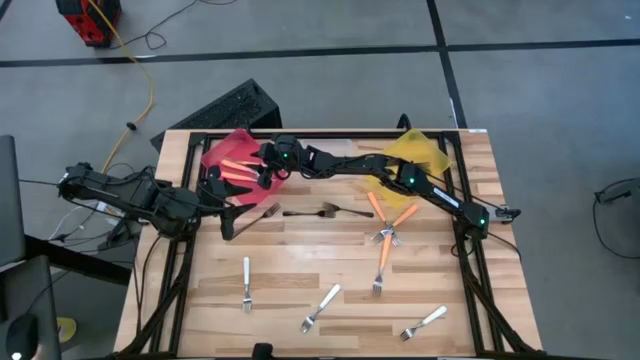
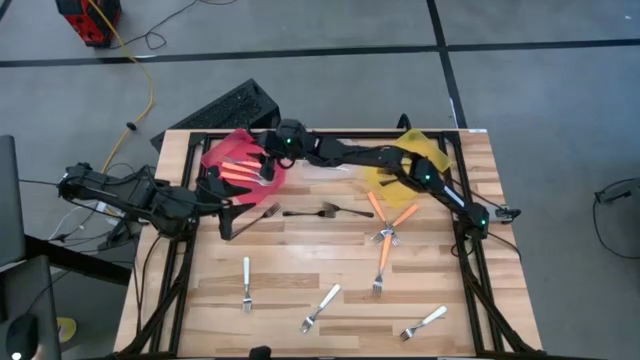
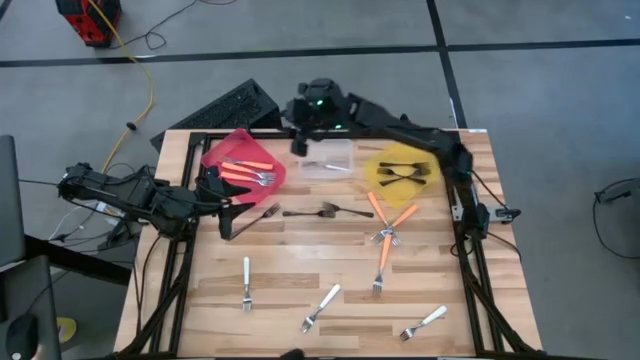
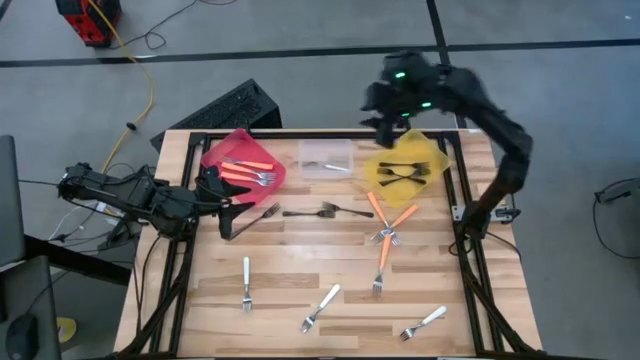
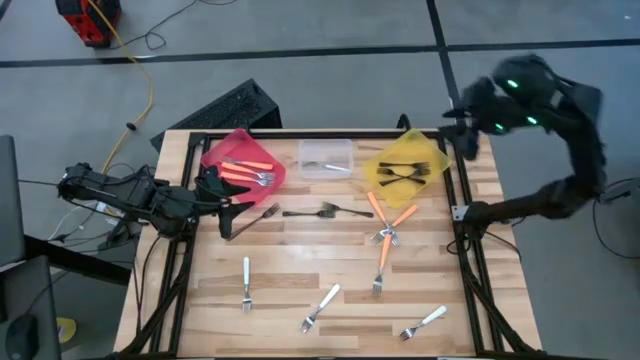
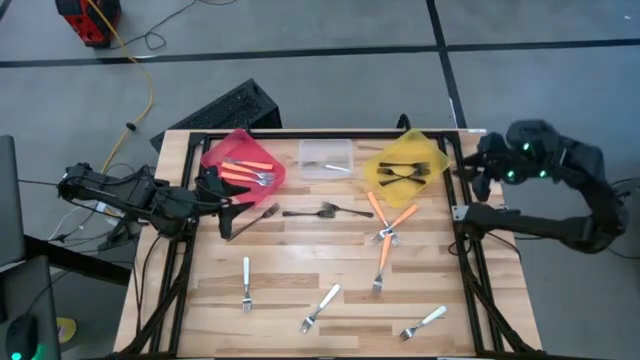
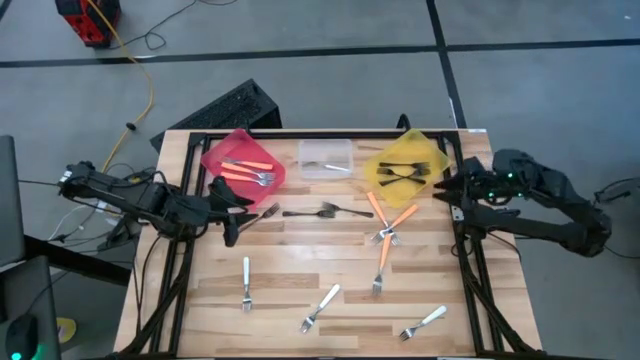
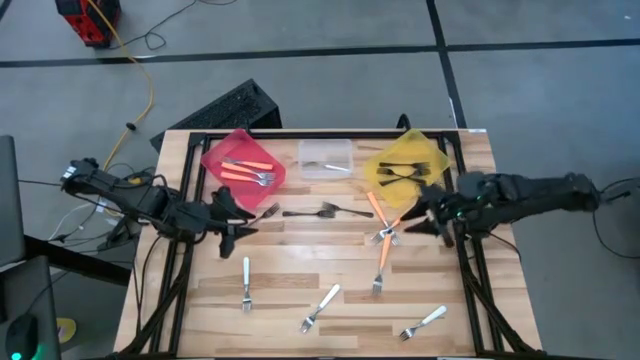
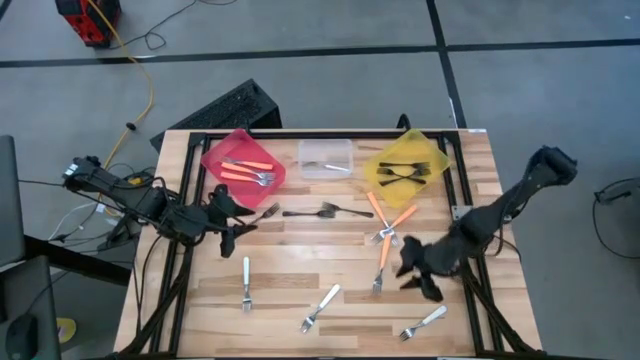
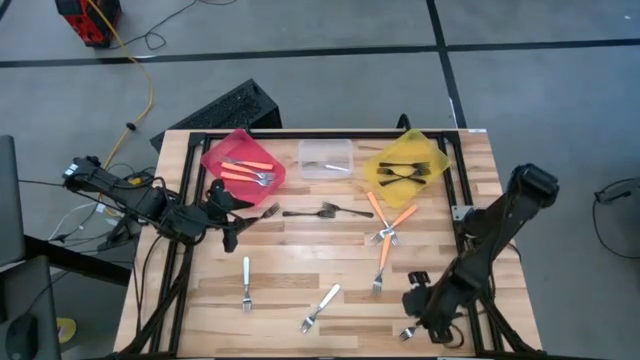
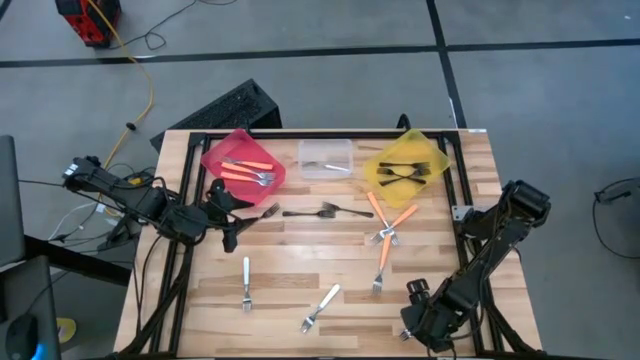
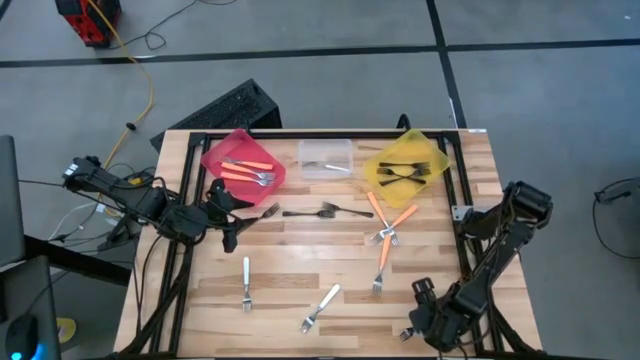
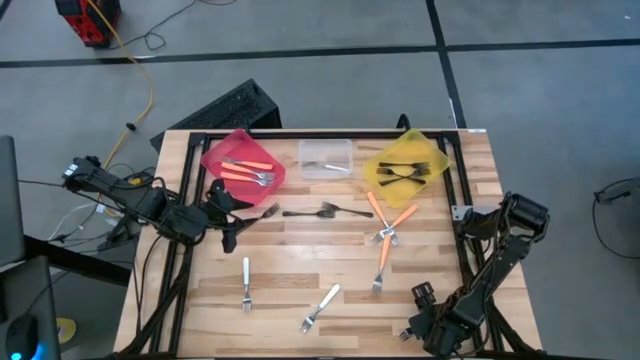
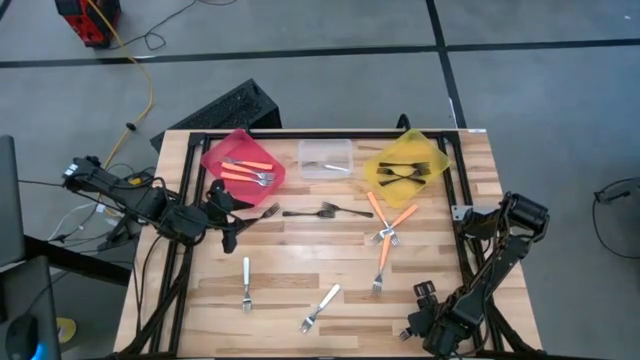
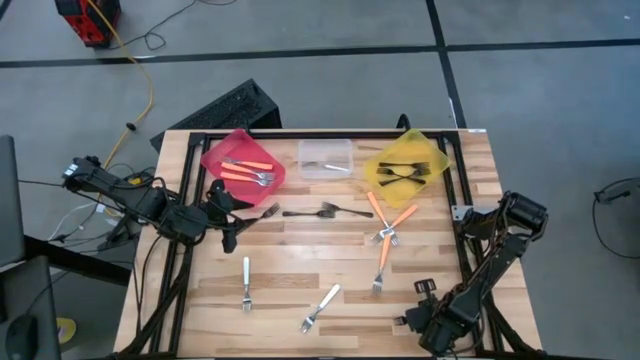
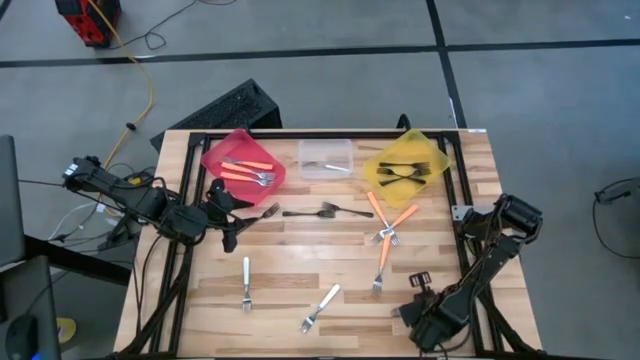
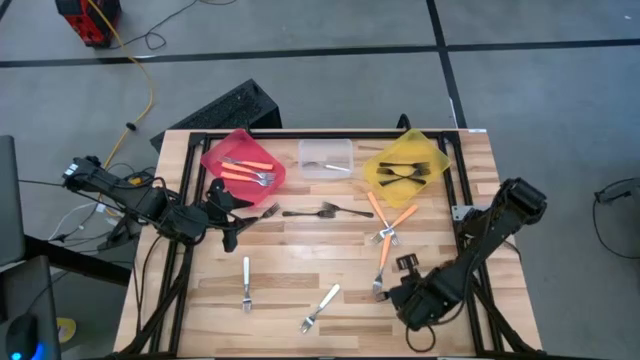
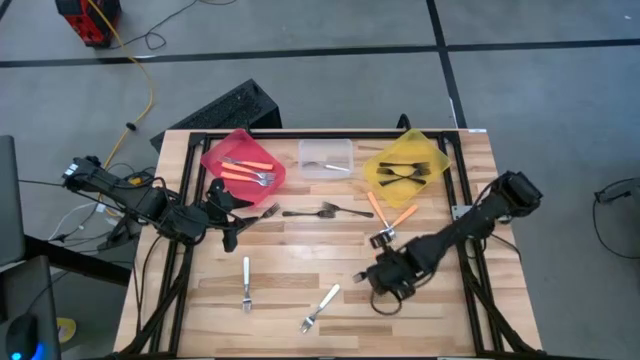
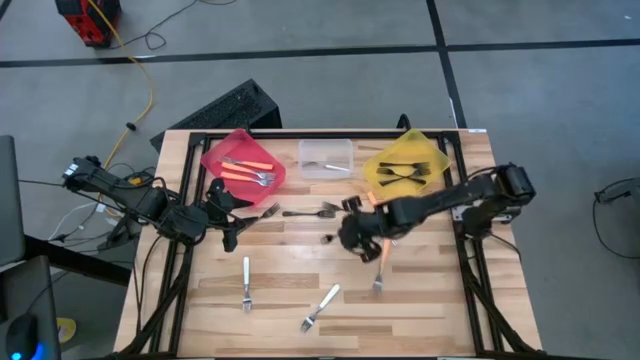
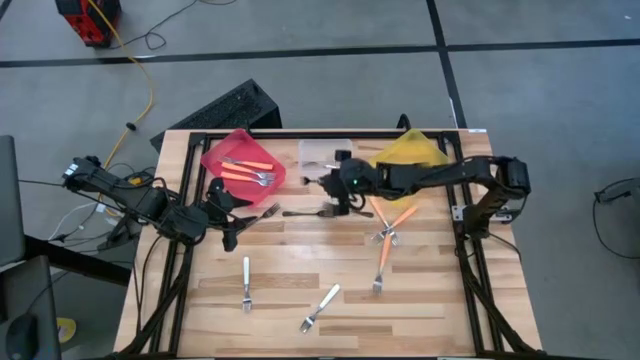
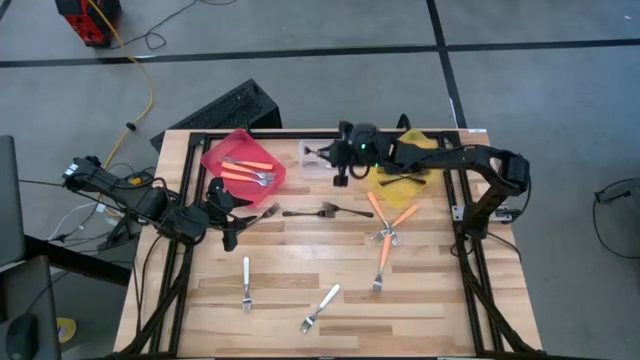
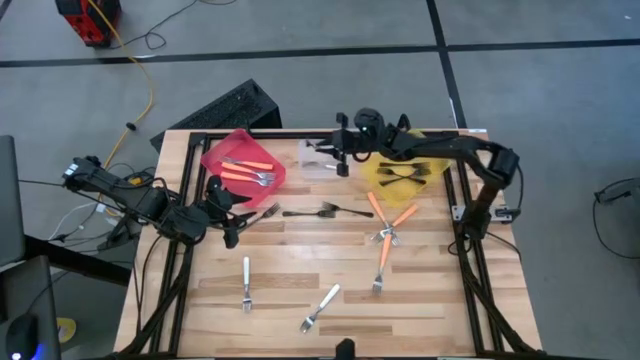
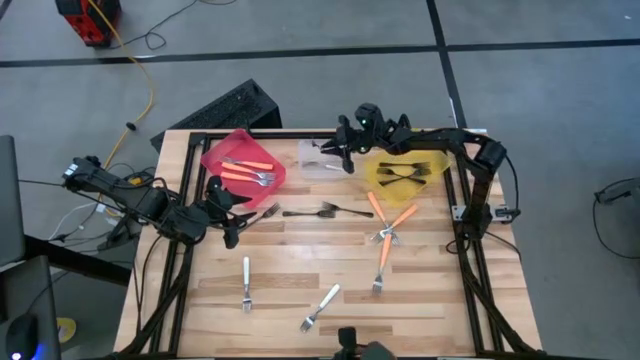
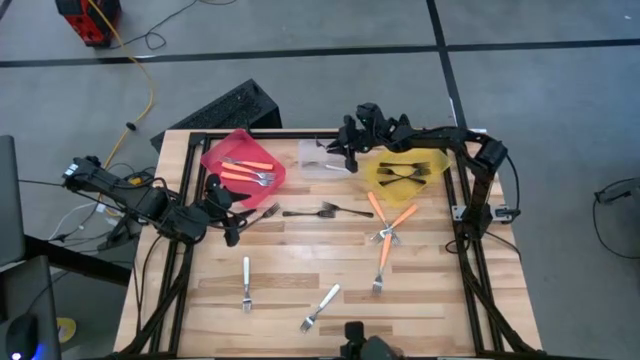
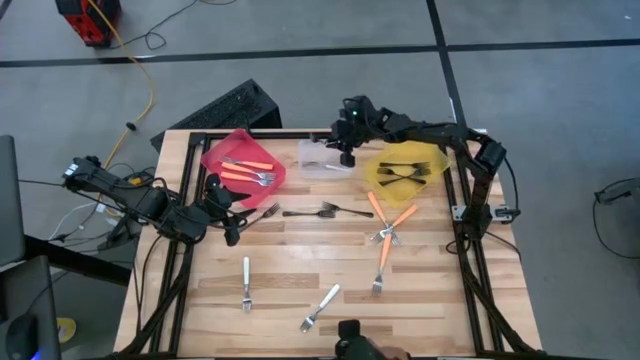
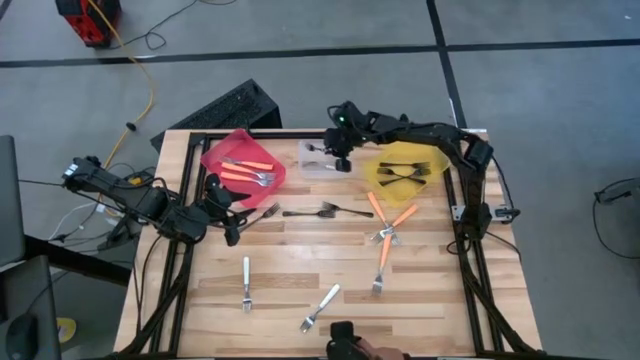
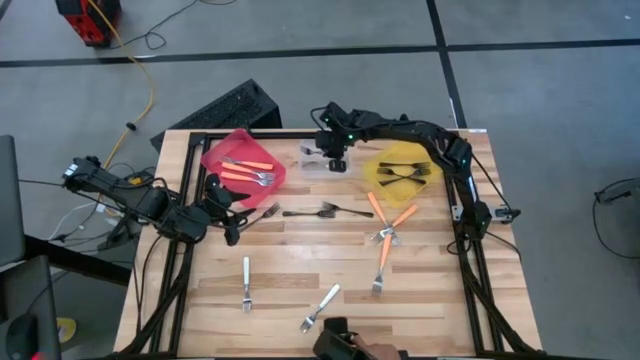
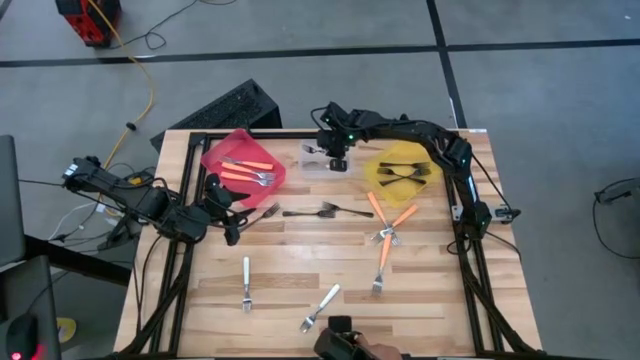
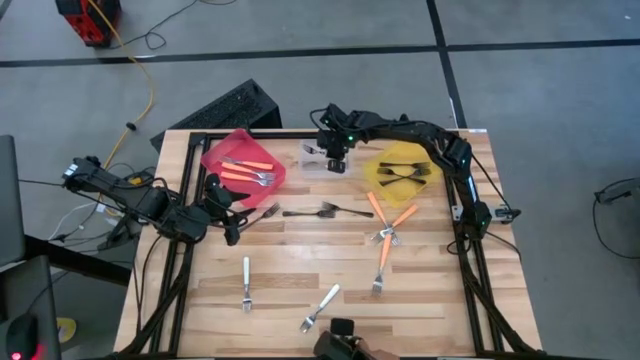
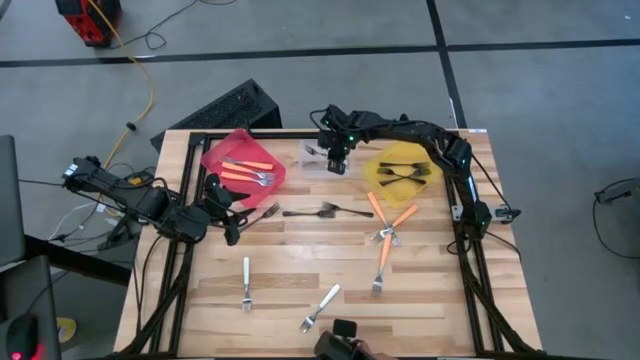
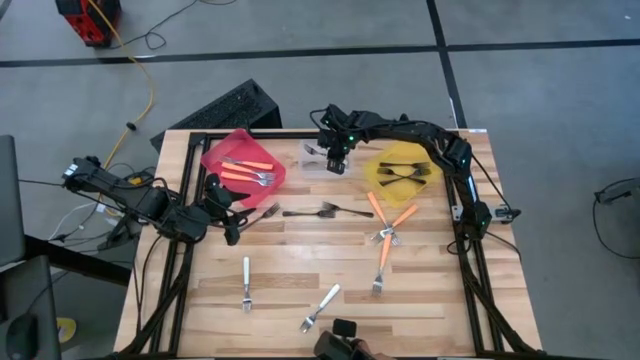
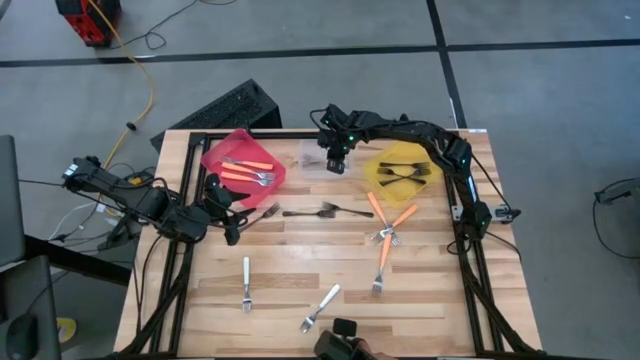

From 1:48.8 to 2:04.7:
Task: Sort silverware by color (type)
Put the white fork into the transparent bin

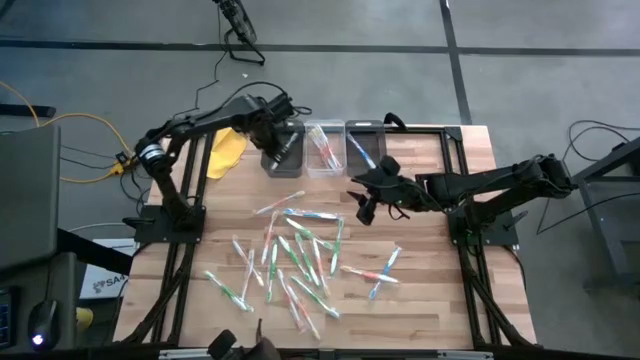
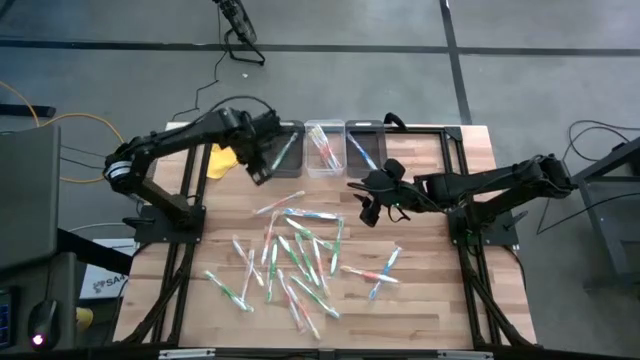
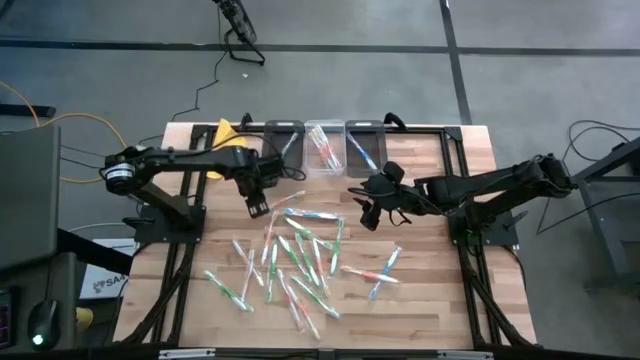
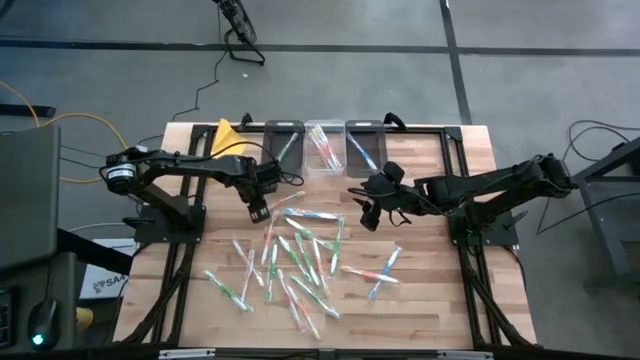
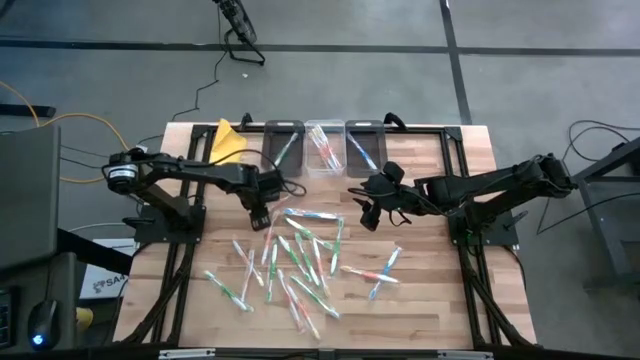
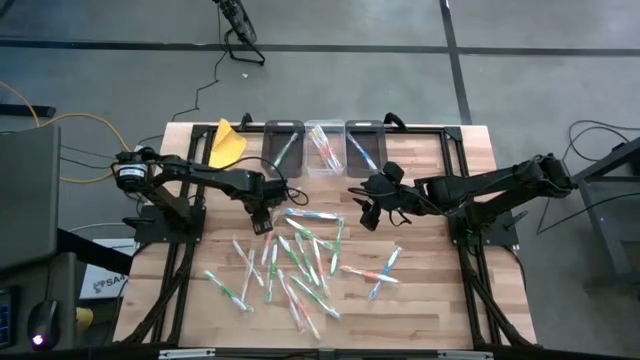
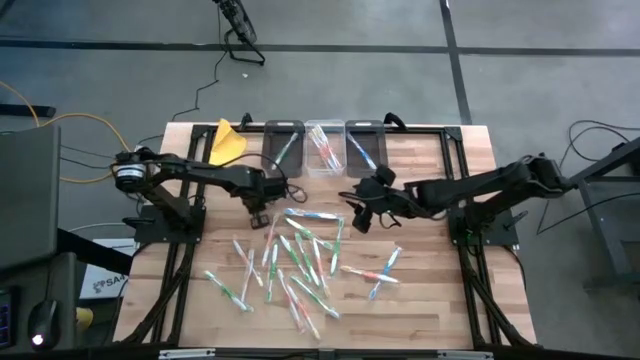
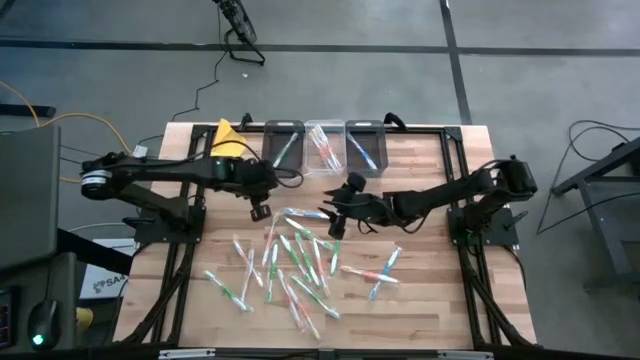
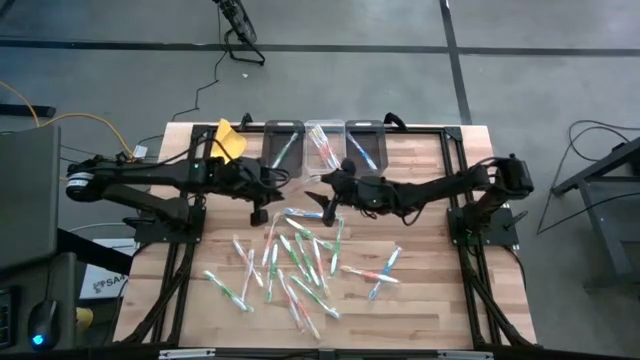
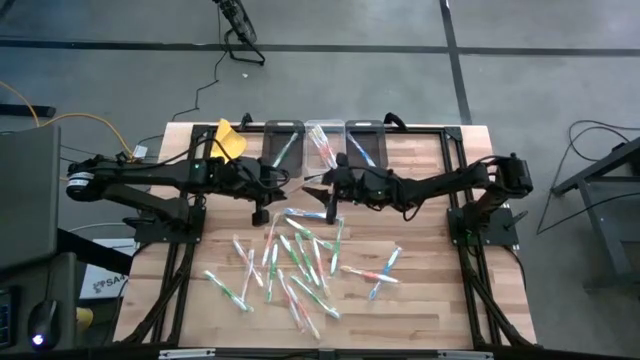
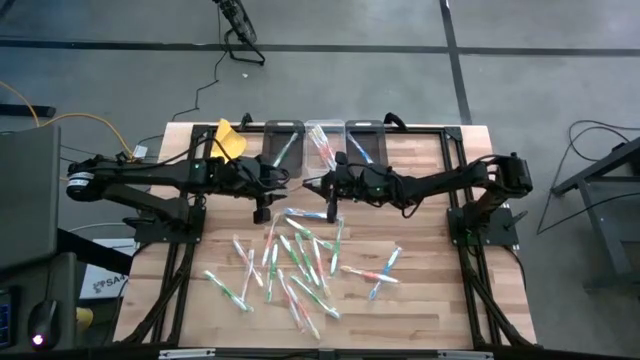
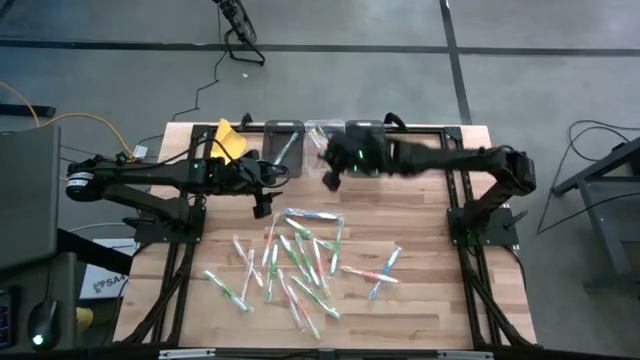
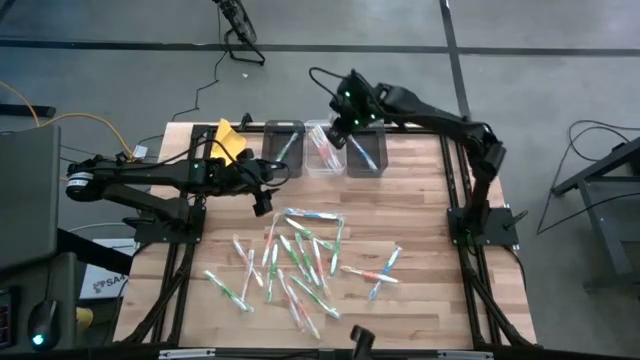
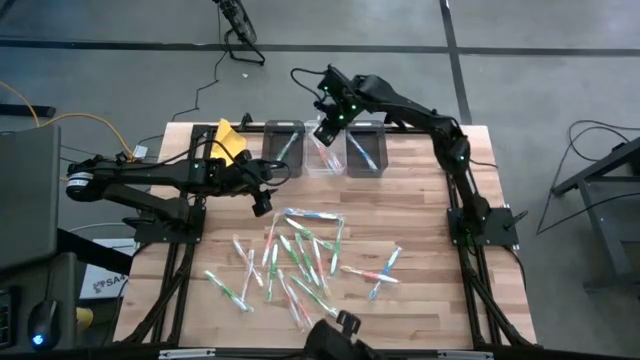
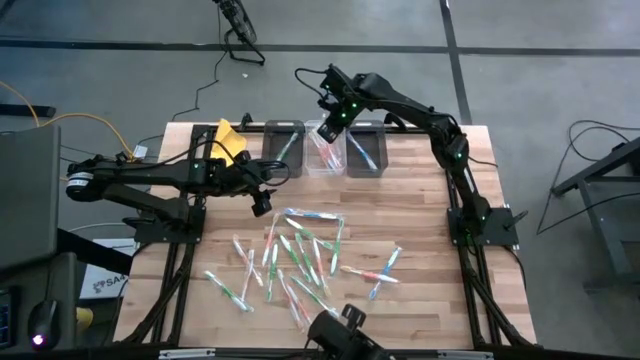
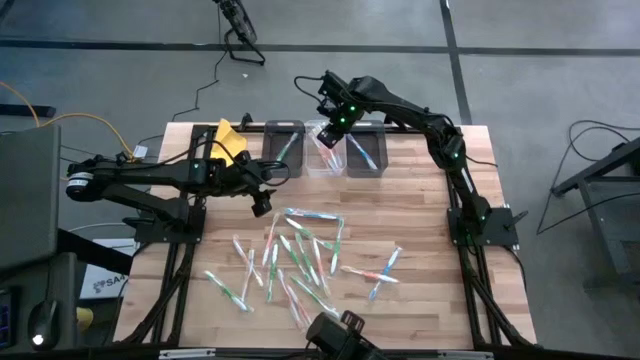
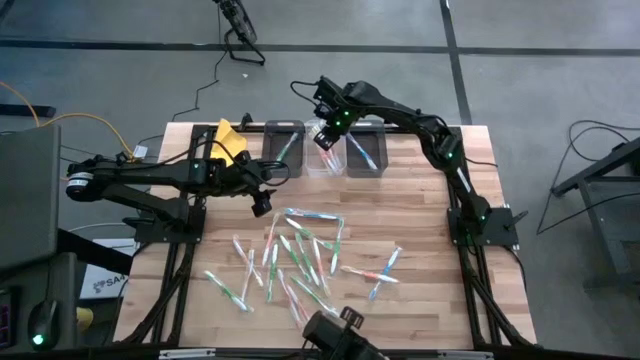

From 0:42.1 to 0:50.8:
Task: Pick & Place Toothbrushes
Put the orange toothbrush into the transparent bin
